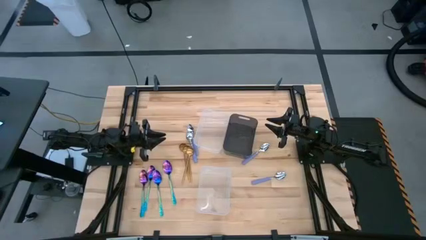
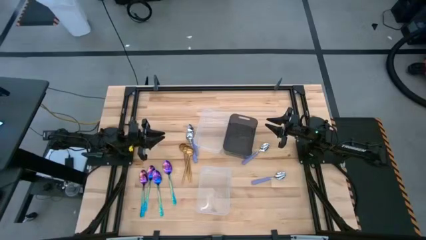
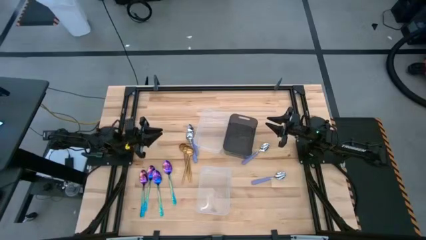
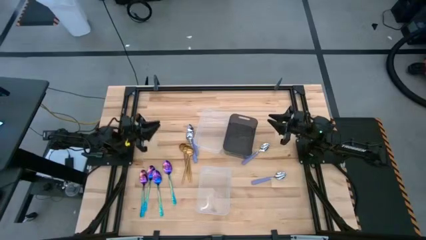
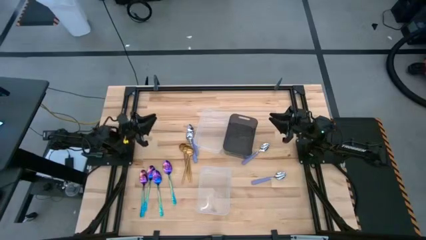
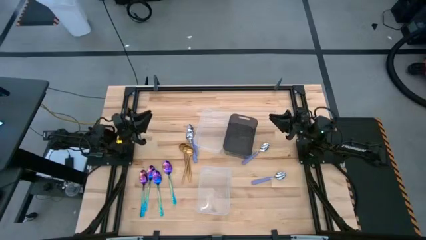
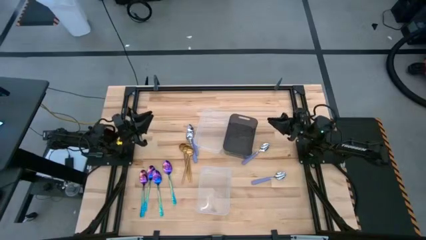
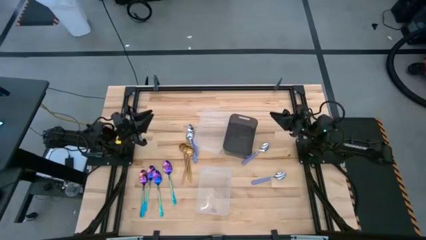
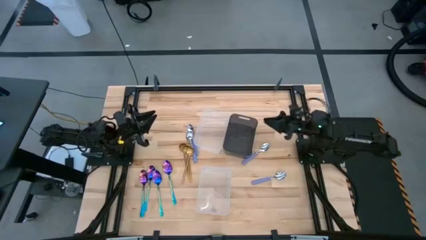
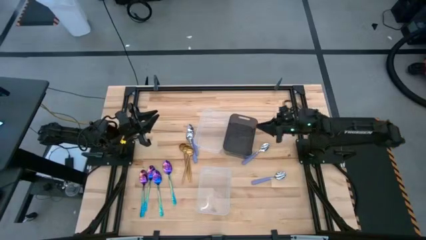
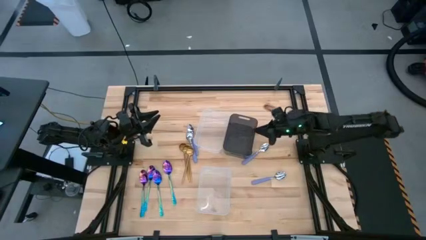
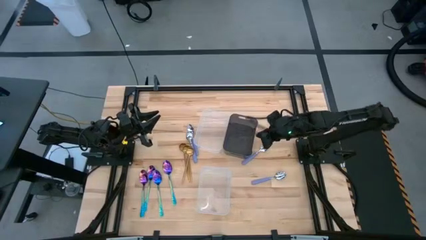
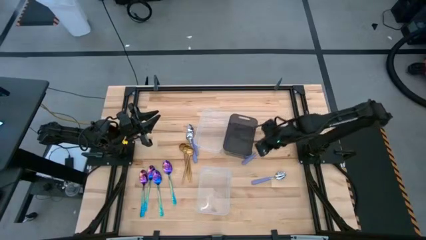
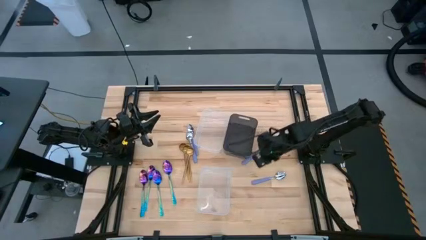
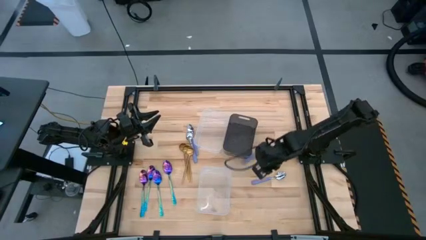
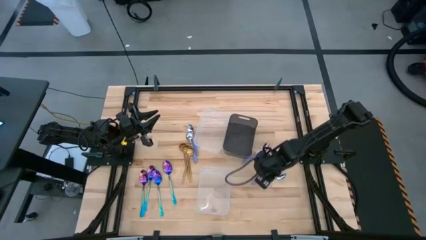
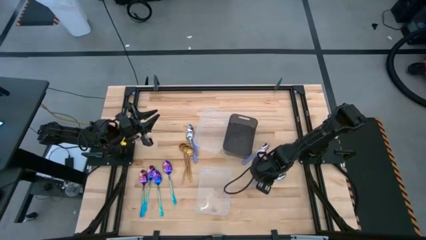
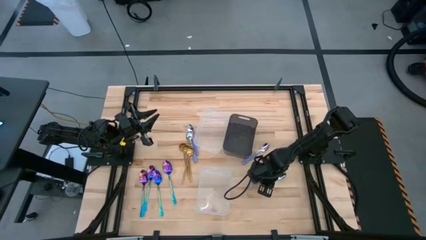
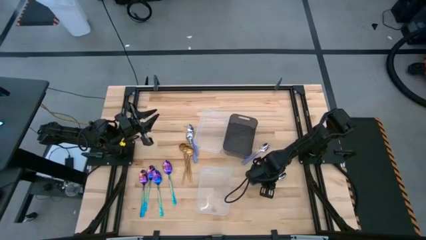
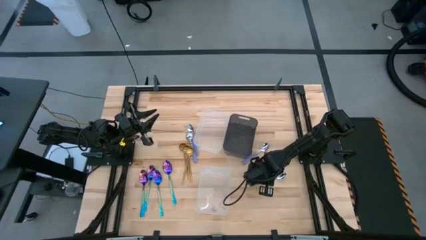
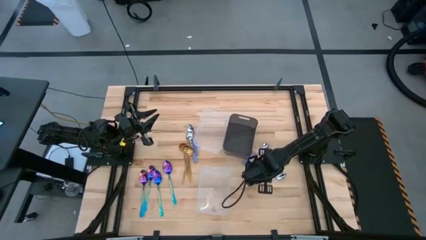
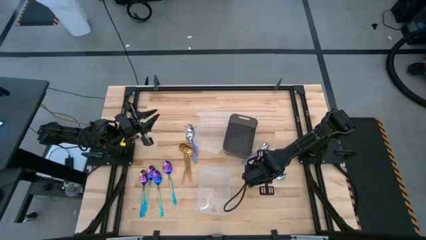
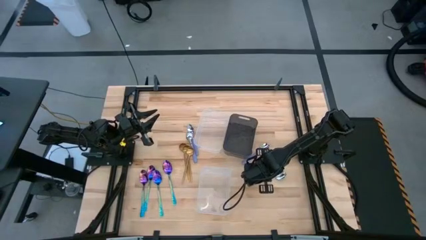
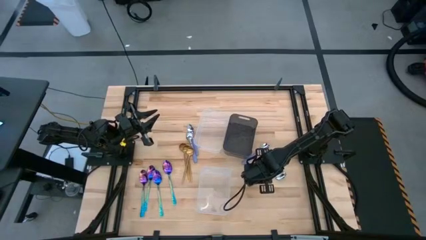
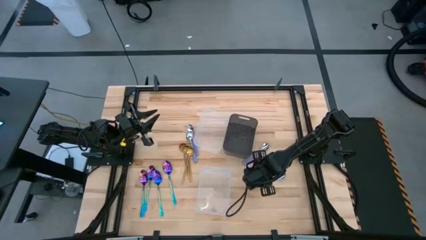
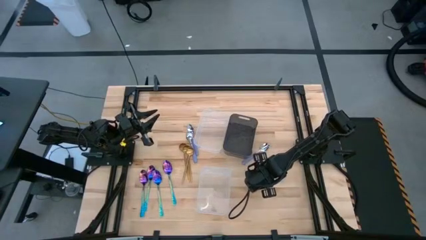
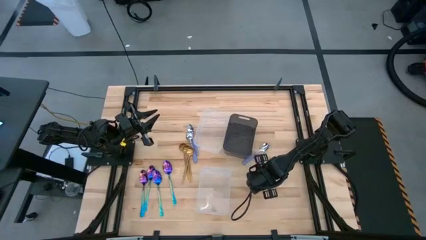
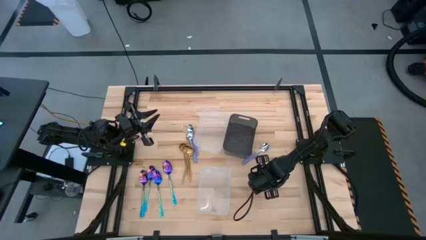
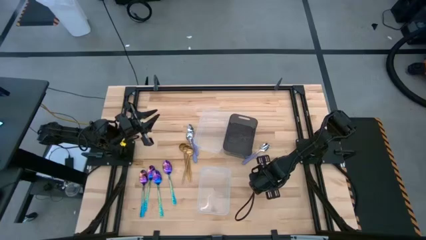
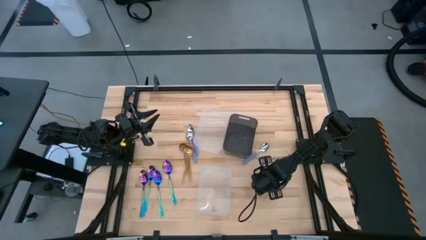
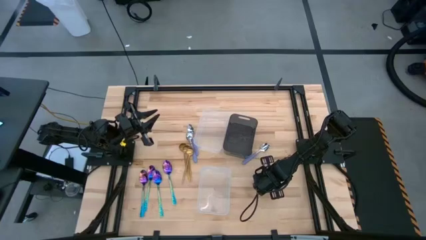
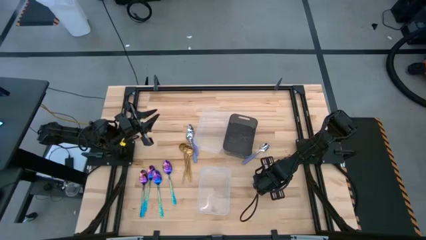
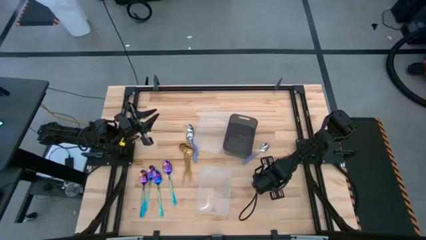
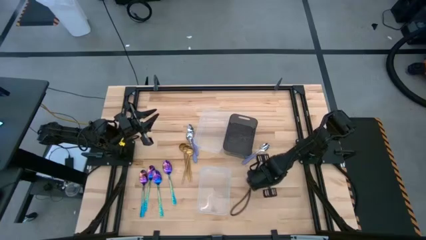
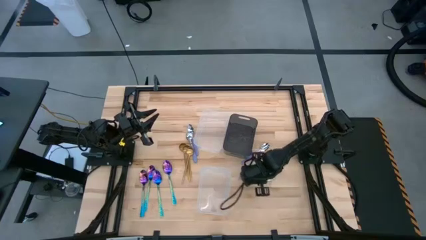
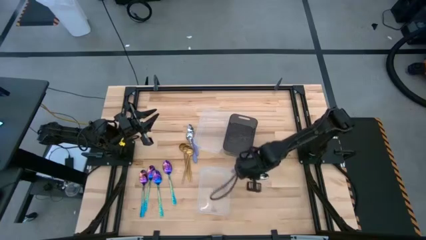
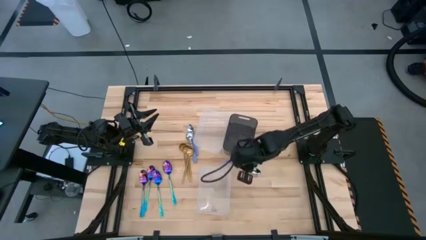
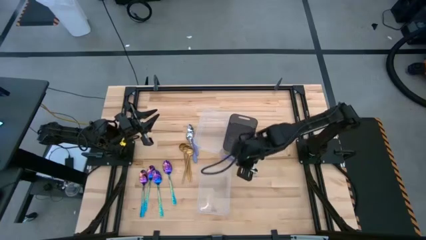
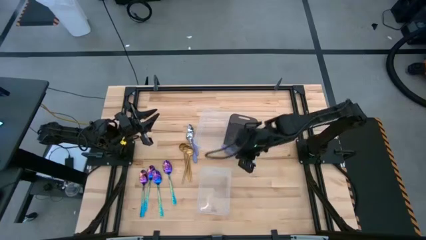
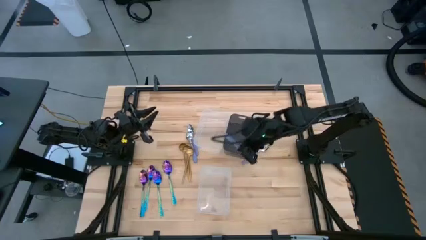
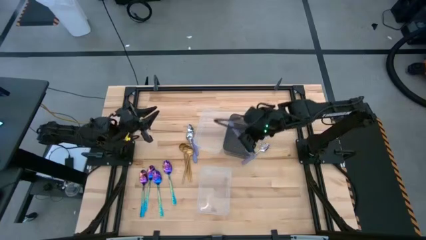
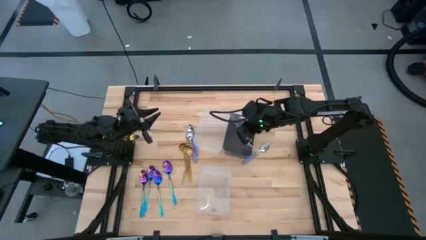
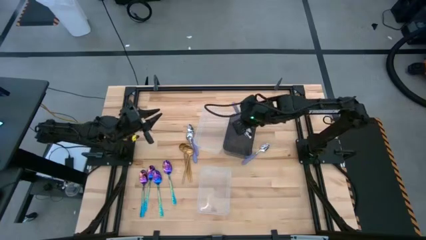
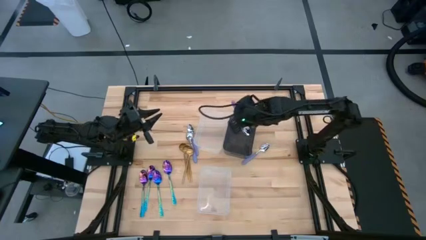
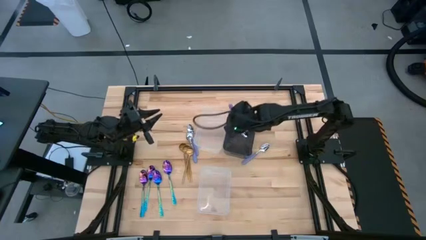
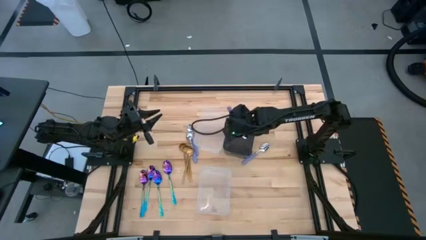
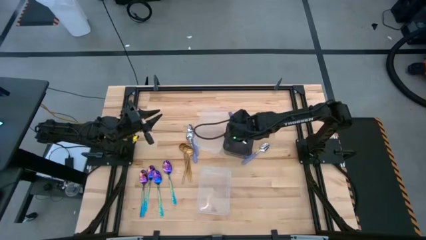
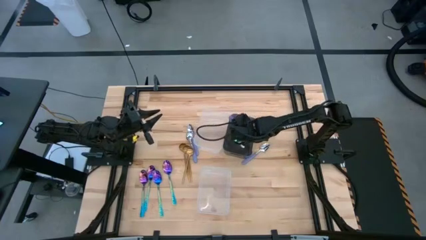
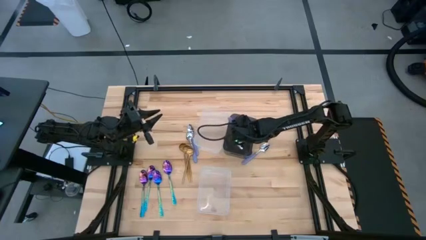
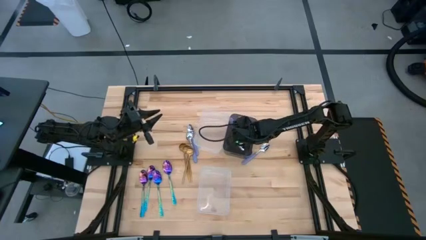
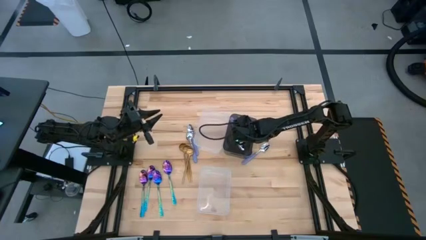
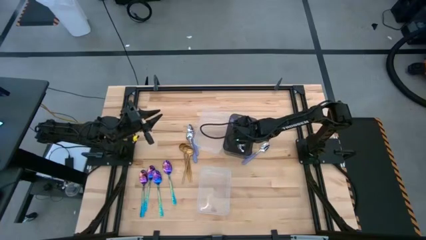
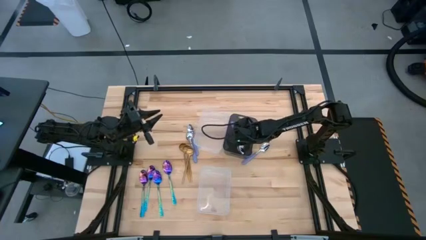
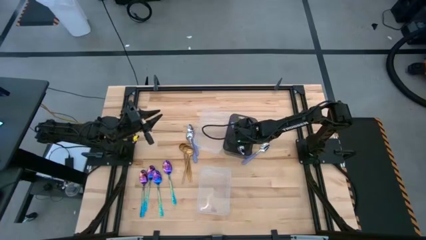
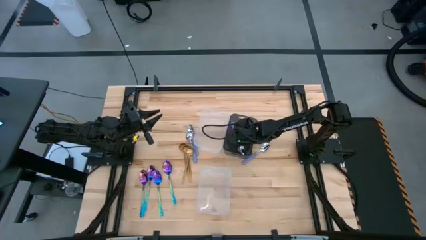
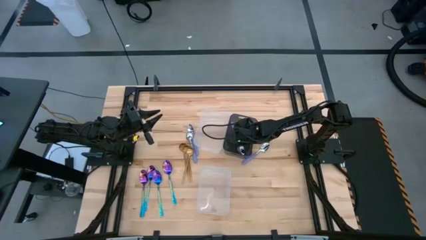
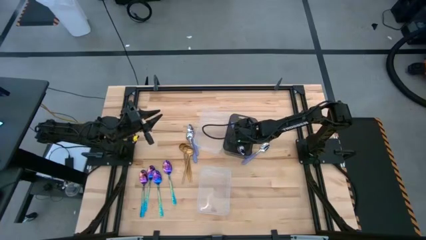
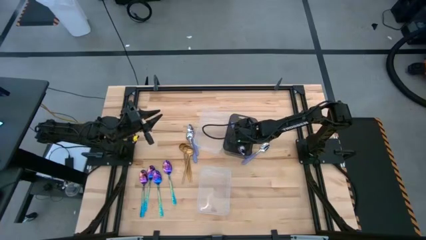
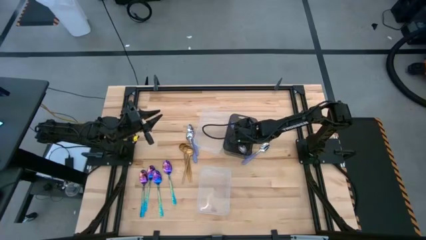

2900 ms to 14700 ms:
Task: Sort silverware by color (type)
Put the purple spoon into the black bin
